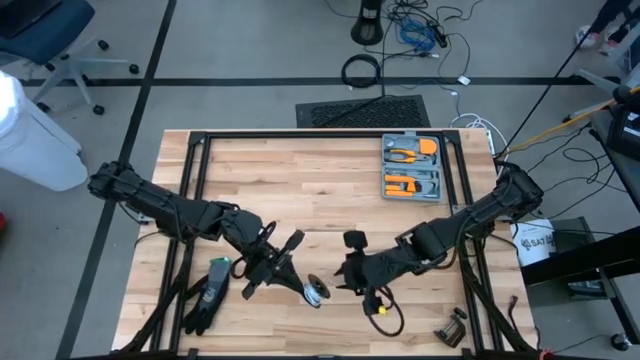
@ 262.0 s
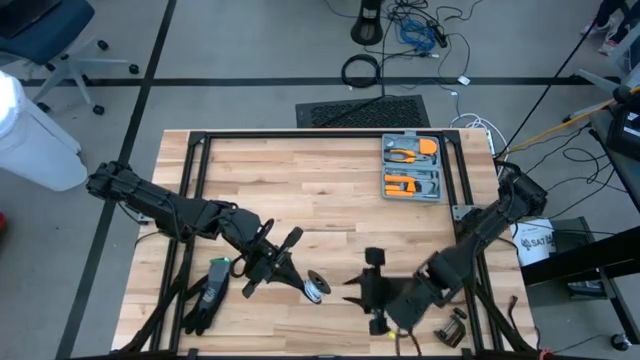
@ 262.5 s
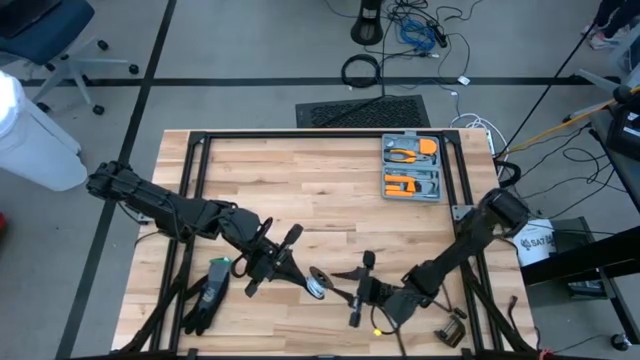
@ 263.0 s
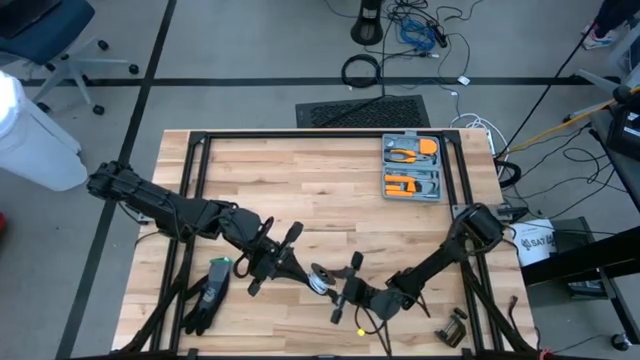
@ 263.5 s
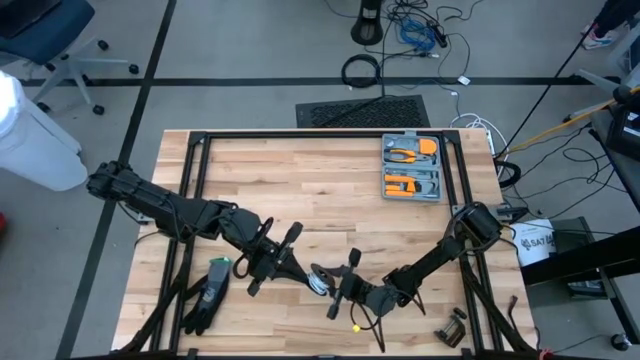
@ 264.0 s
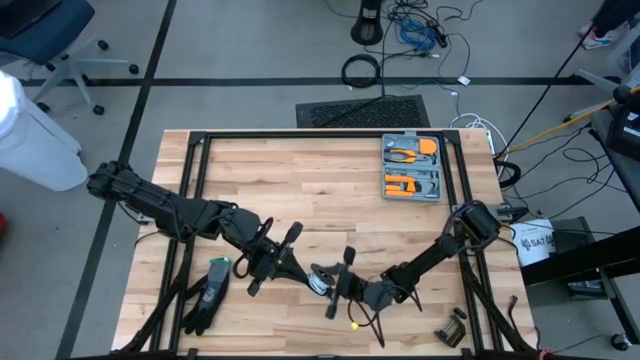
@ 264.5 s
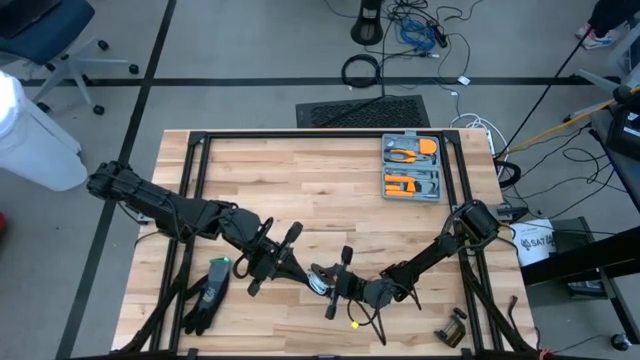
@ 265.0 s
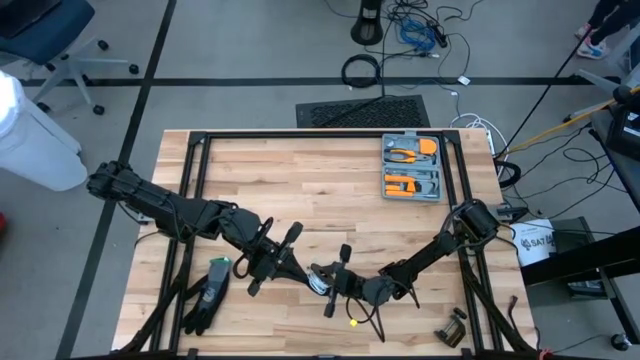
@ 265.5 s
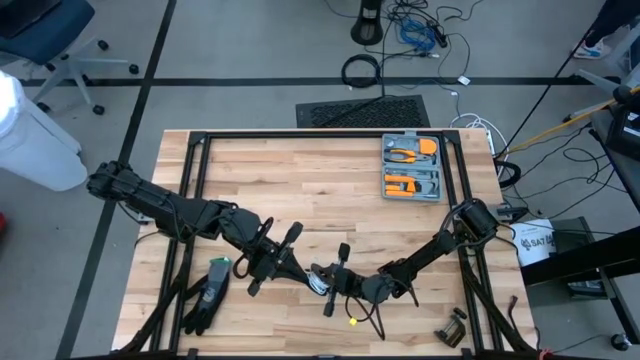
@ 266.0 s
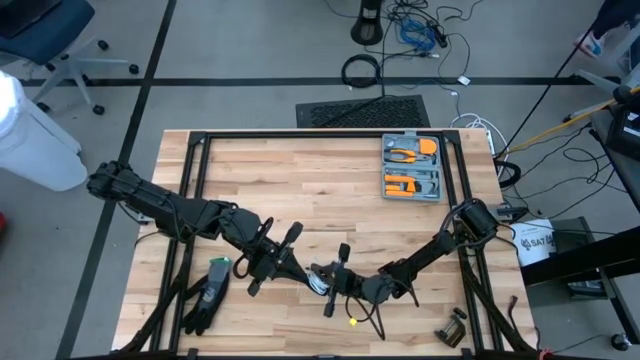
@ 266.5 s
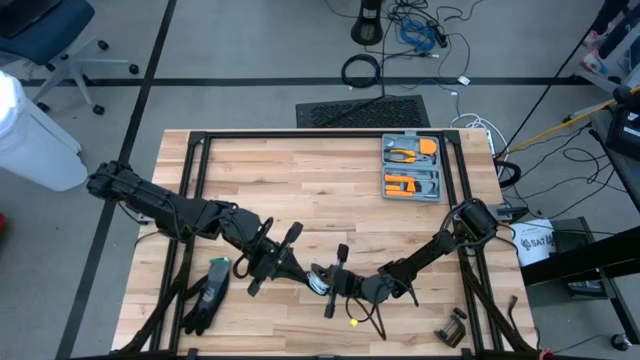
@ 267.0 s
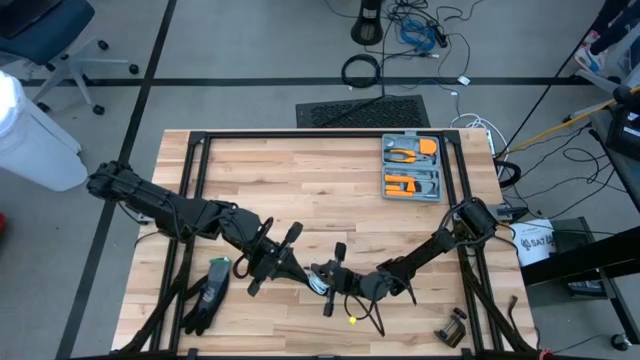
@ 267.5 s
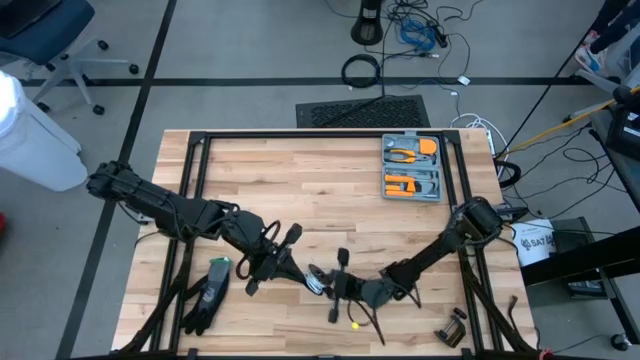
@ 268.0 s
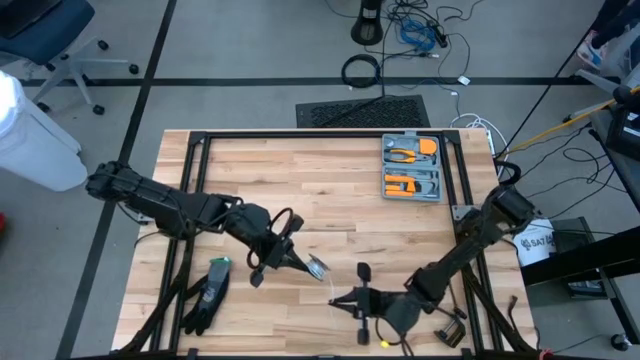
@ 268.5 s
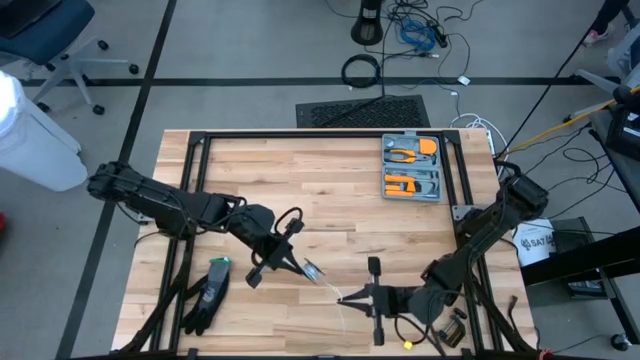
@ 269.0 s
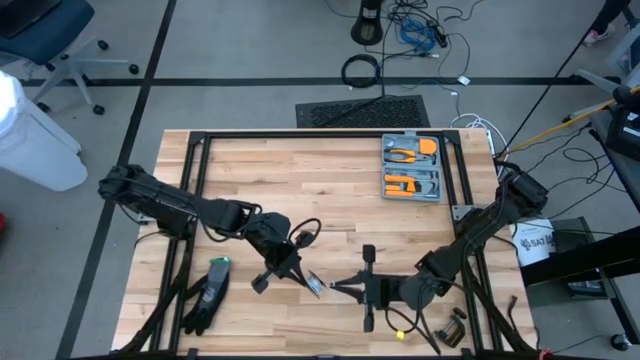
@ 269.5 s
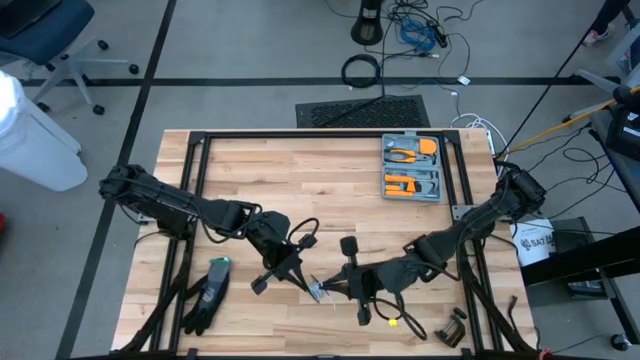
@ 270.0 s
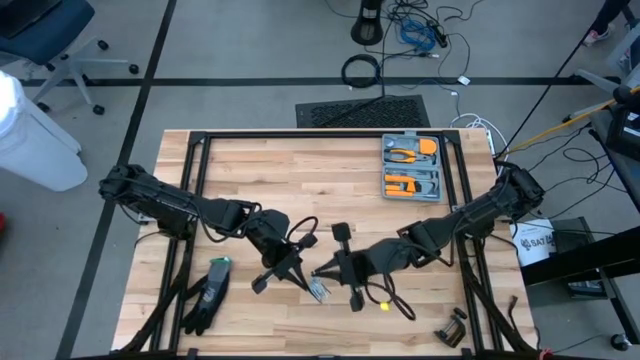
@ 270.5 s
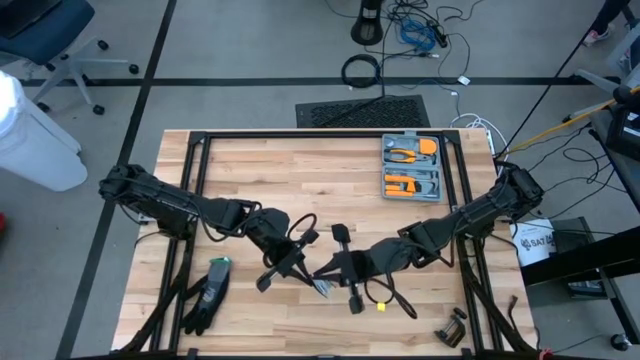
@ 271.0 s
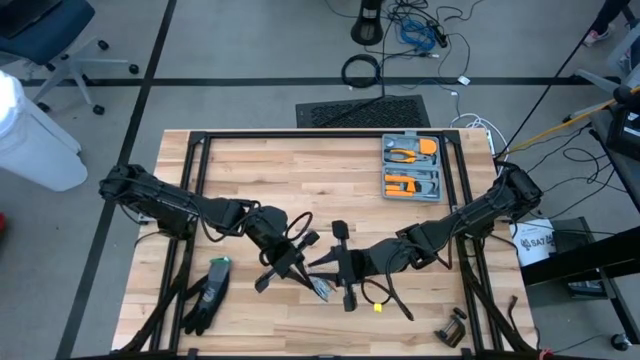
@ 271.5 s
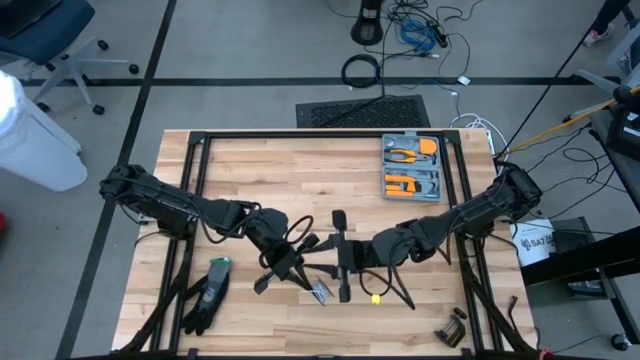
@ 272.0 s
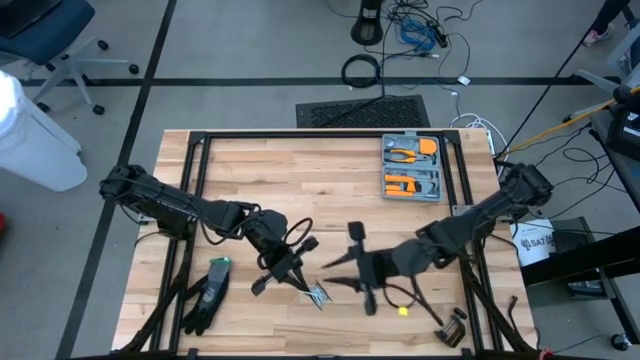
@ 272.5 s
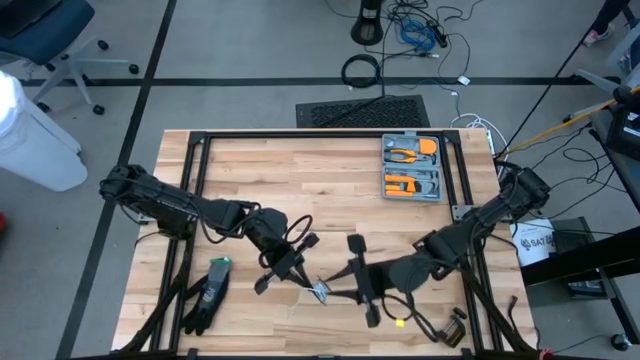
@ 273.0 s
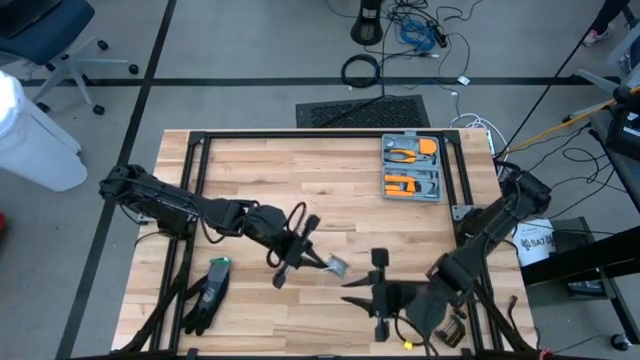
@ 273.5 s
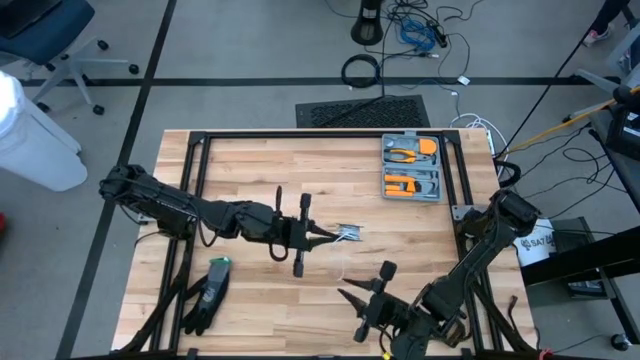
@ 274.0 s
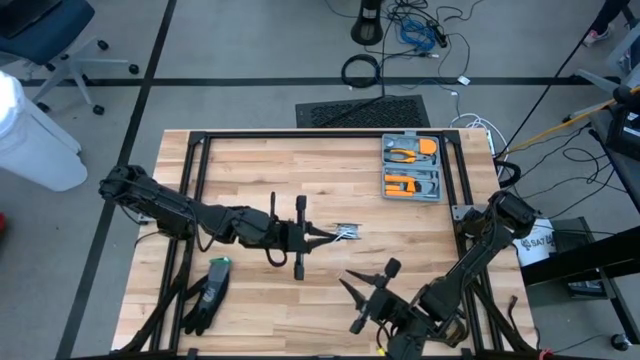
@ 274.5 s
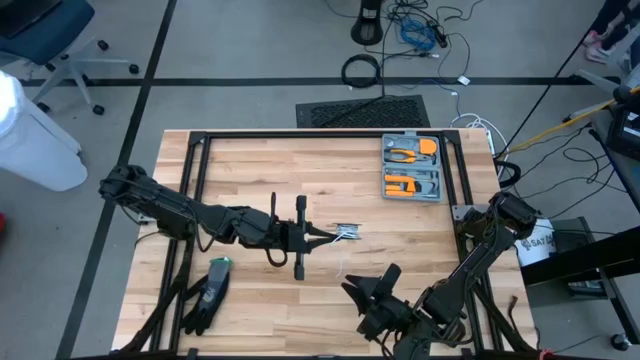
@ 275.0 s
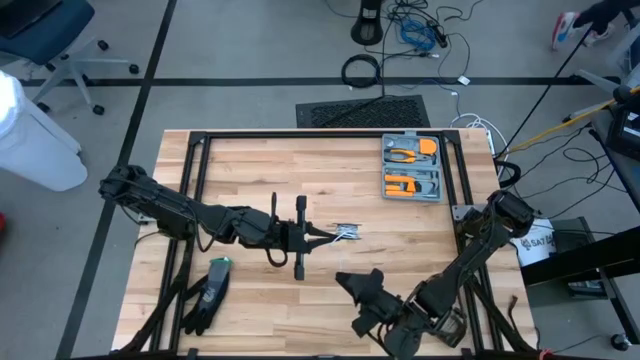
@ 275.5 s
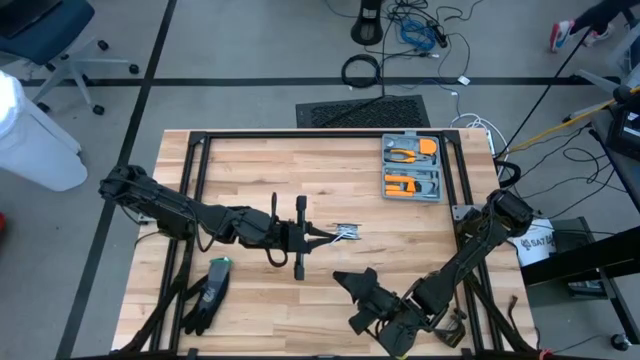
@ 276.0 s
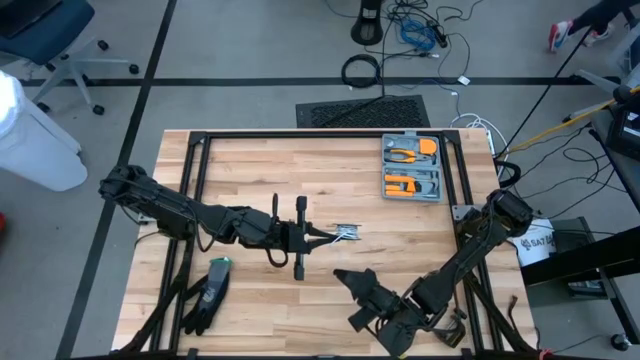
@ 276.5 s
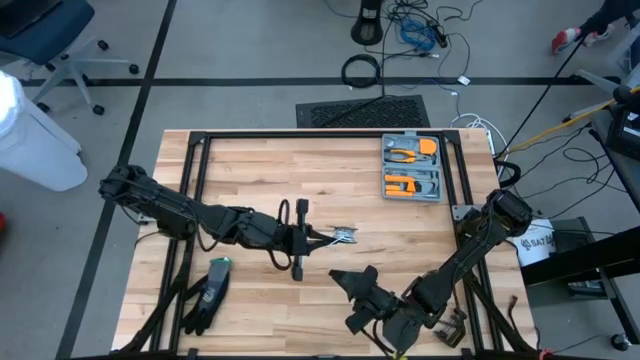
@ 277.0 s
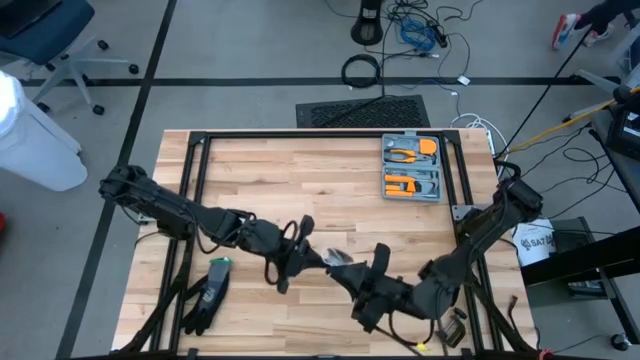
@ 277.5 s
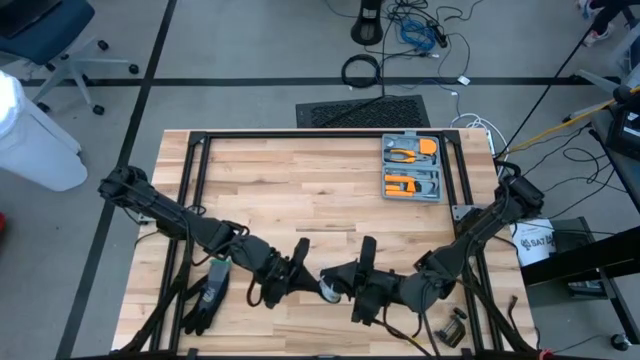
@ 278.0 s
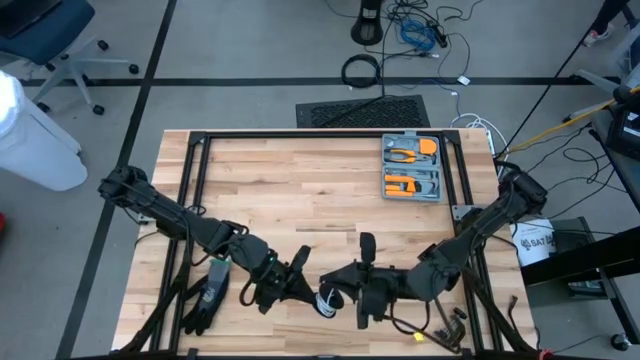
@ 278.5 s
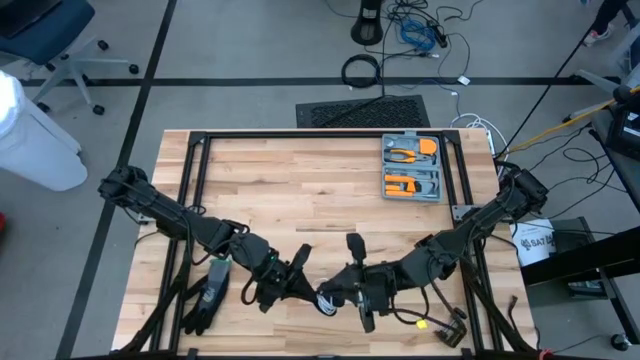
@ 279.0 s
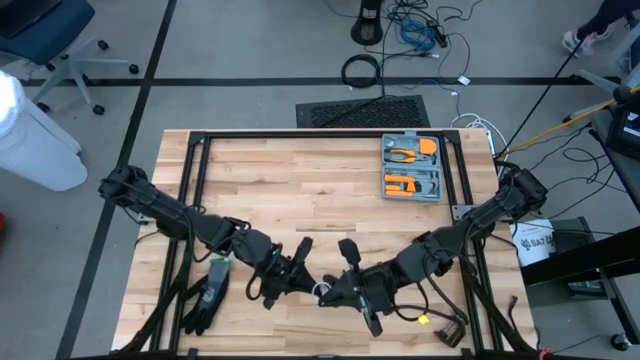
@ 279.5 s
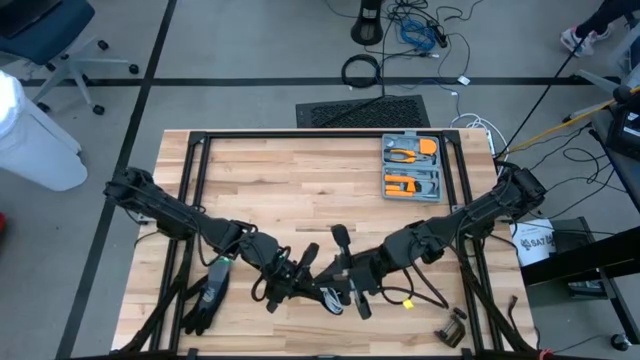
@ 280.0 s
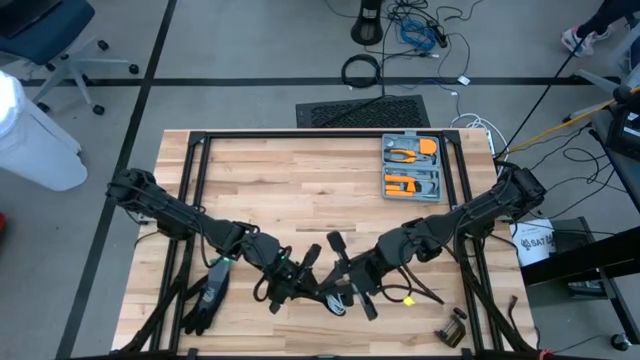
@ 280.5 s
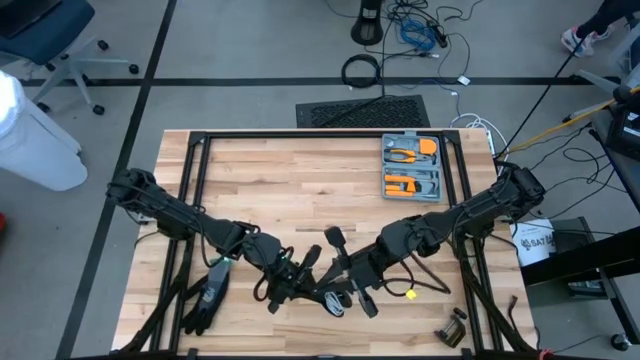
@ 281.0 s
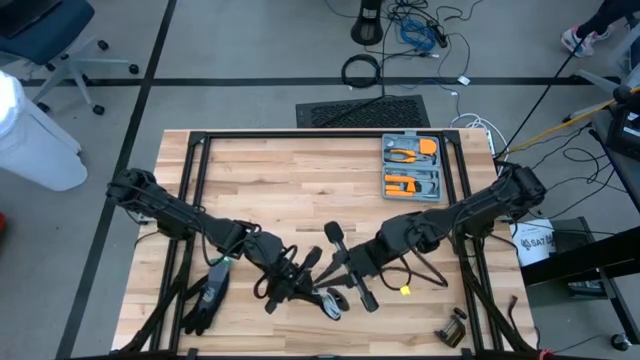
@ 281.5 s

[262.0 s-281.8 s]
Task: Coil cords
Coil the white wire onto the spool
